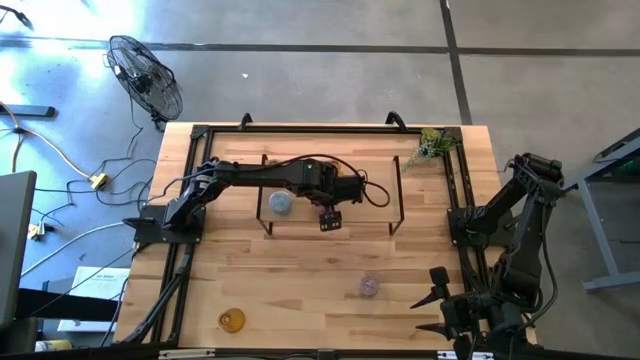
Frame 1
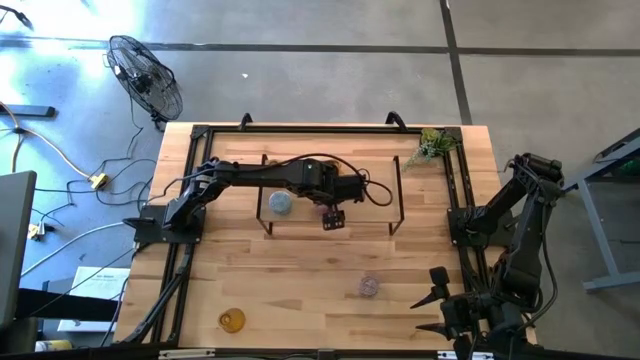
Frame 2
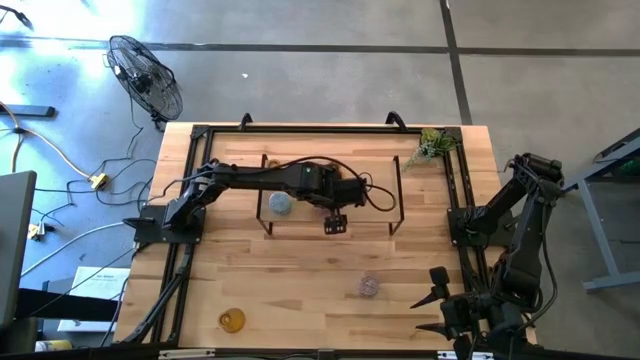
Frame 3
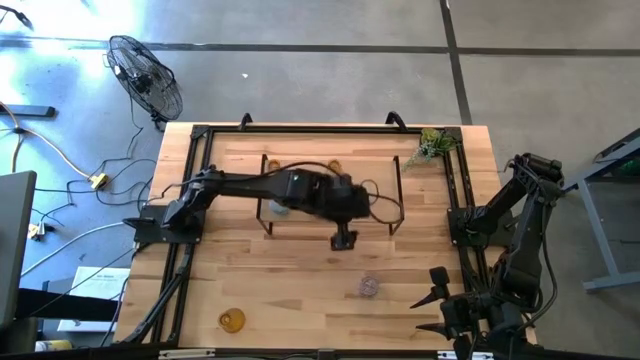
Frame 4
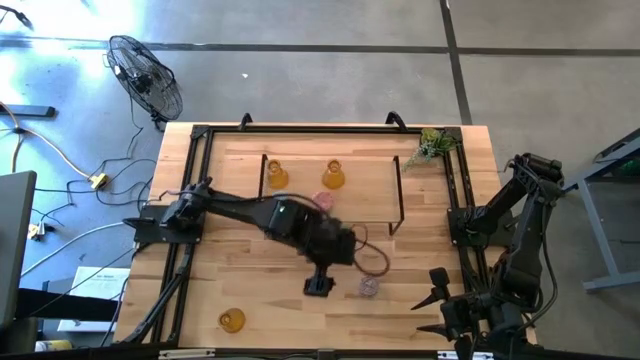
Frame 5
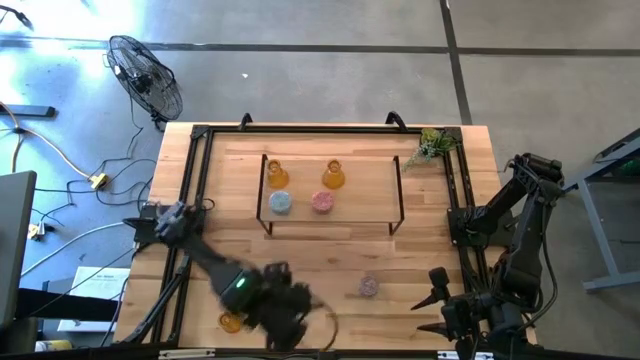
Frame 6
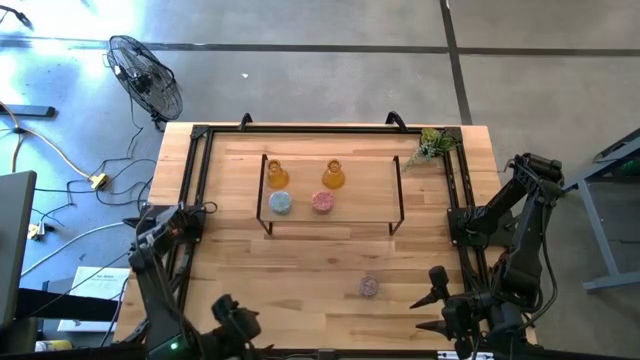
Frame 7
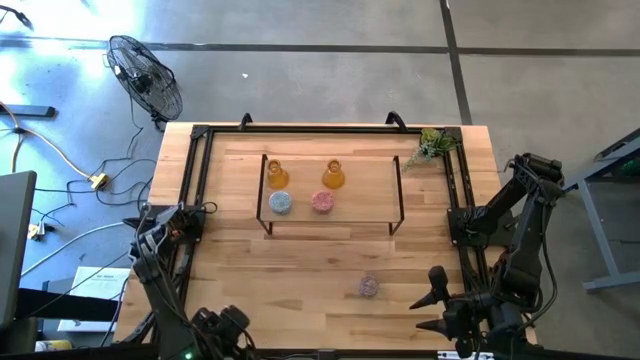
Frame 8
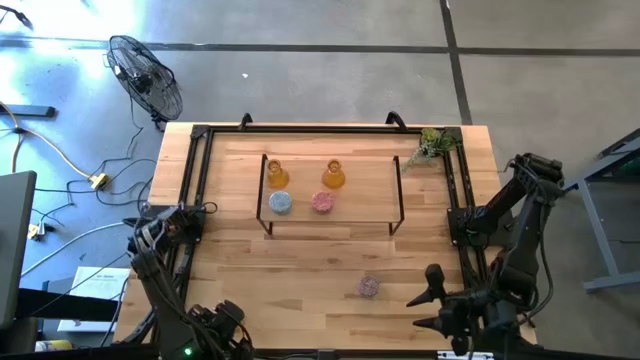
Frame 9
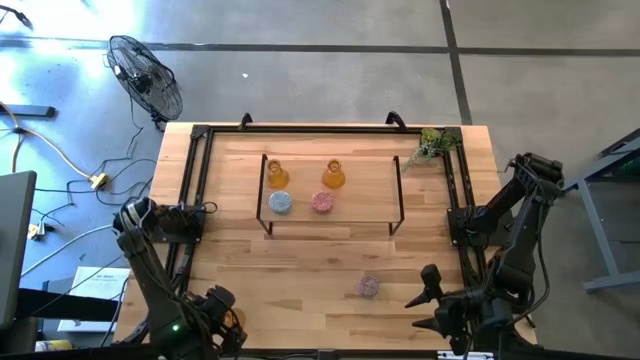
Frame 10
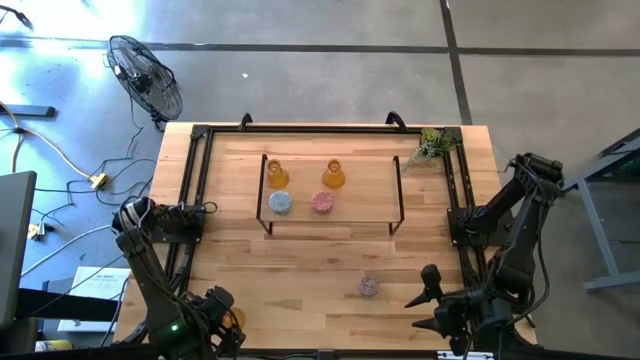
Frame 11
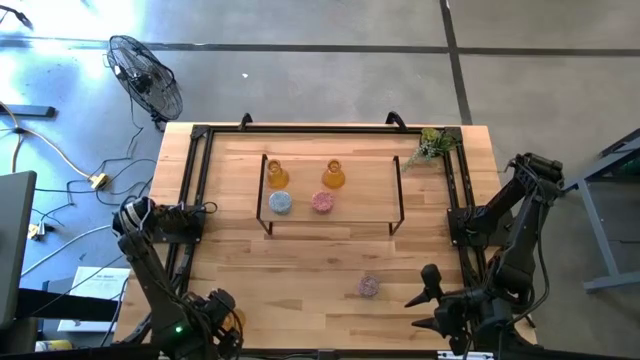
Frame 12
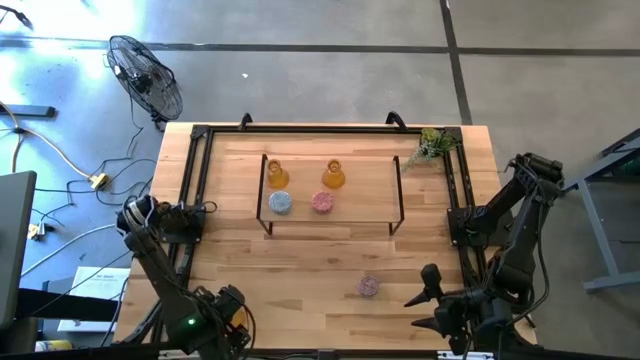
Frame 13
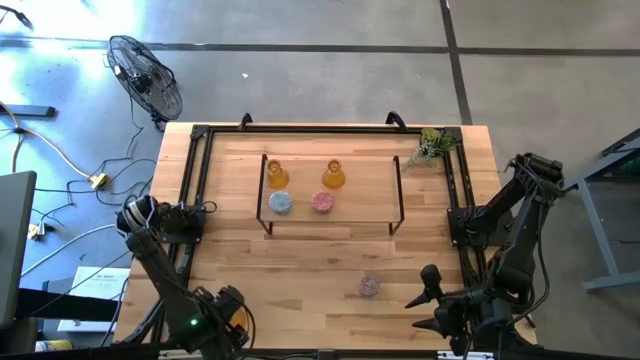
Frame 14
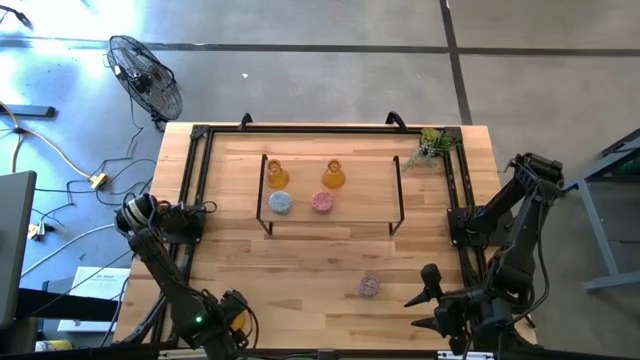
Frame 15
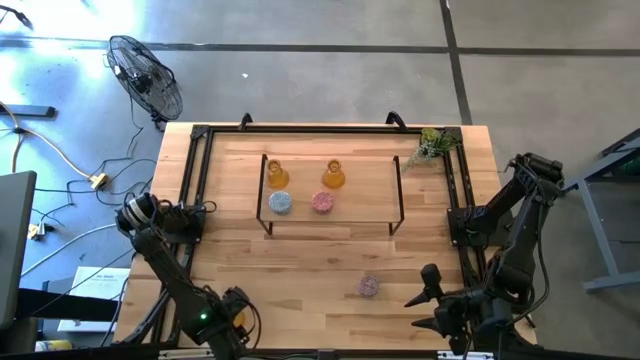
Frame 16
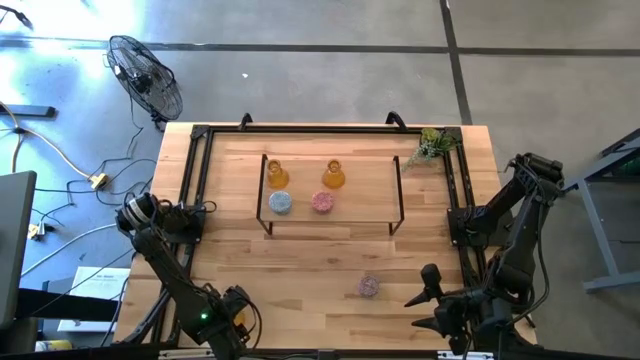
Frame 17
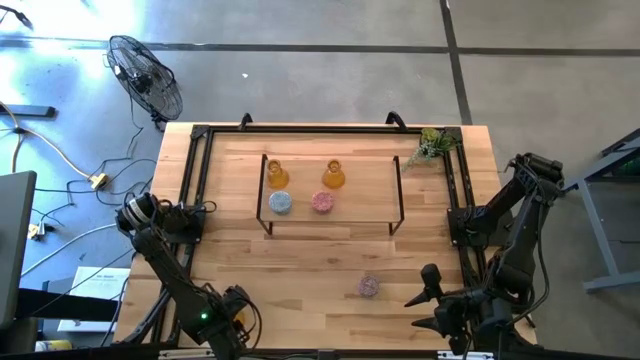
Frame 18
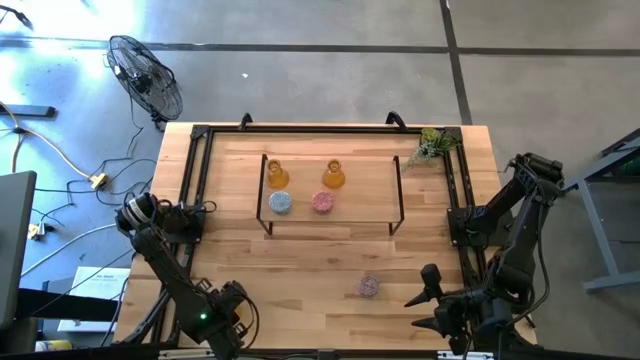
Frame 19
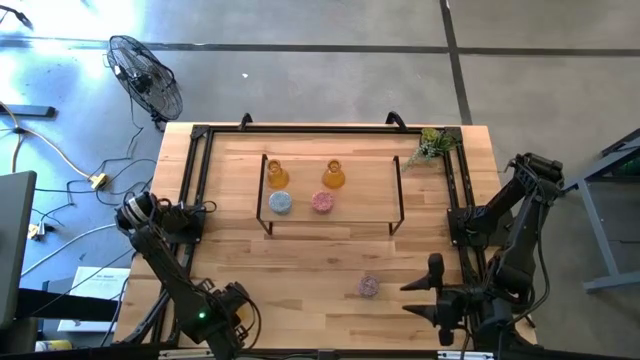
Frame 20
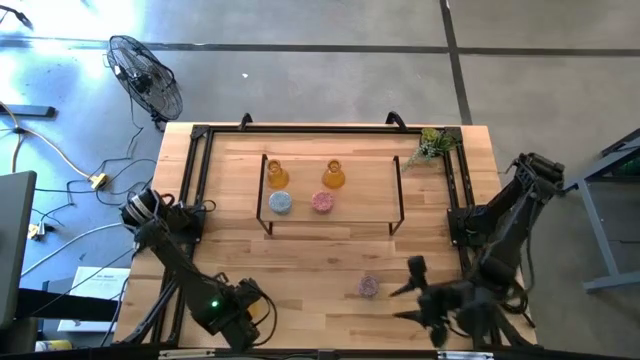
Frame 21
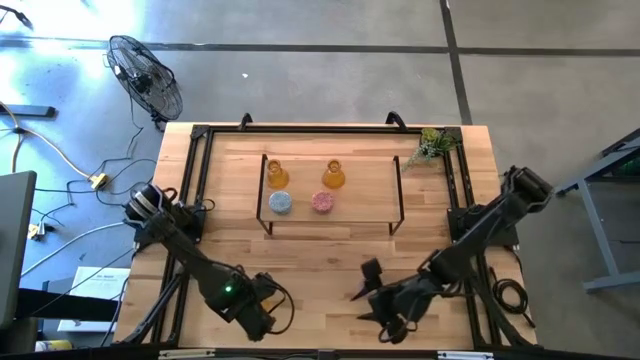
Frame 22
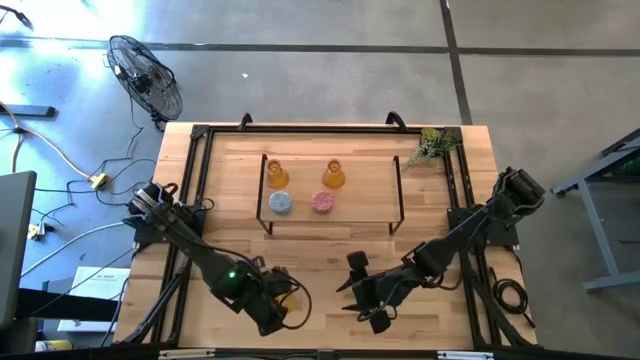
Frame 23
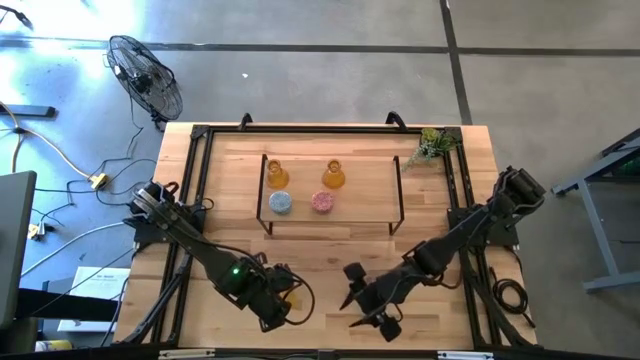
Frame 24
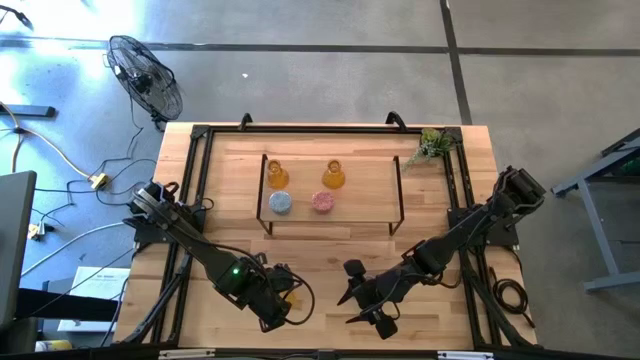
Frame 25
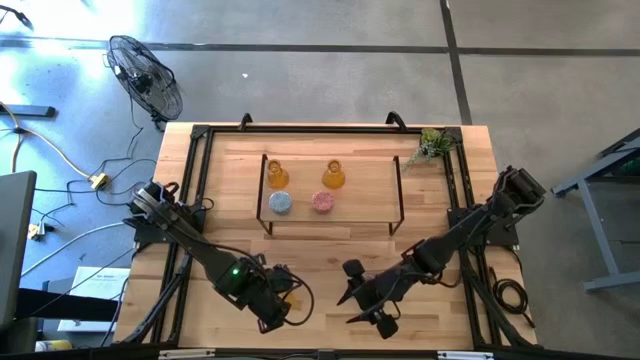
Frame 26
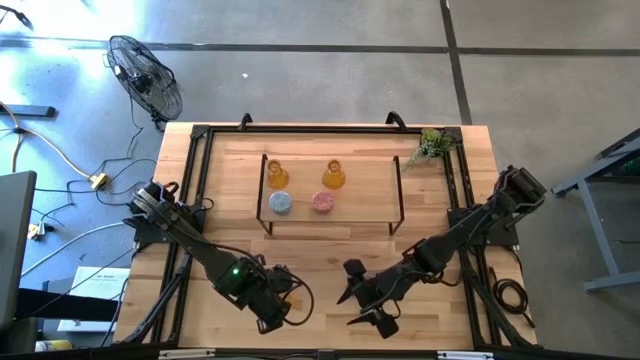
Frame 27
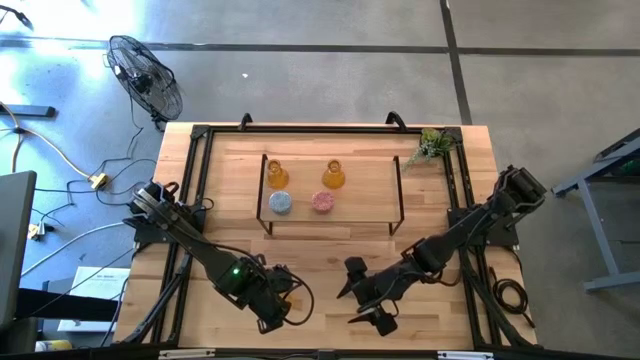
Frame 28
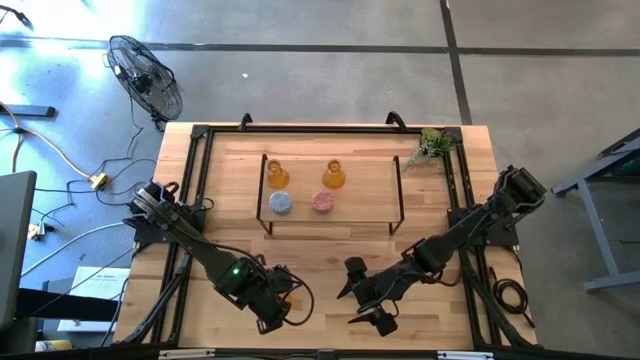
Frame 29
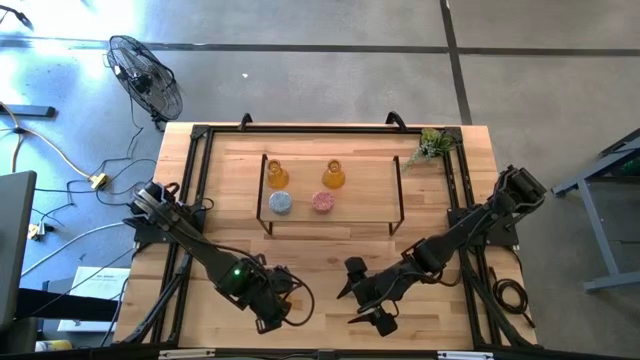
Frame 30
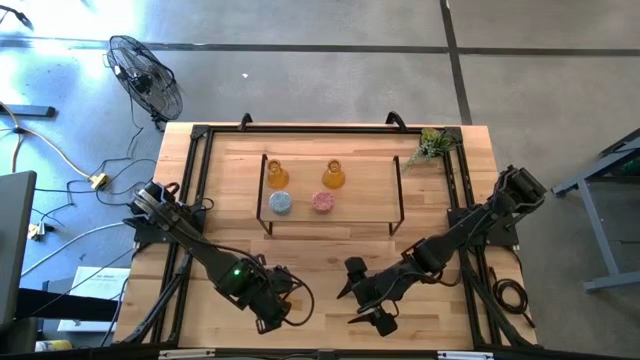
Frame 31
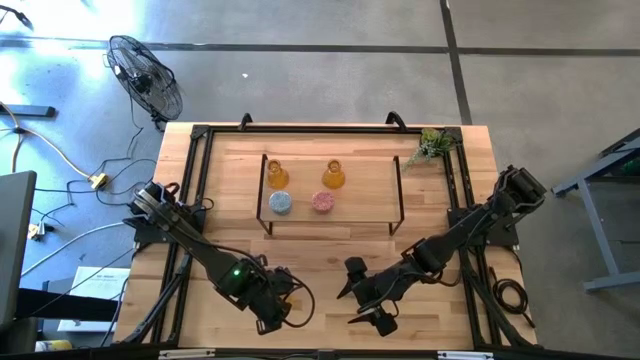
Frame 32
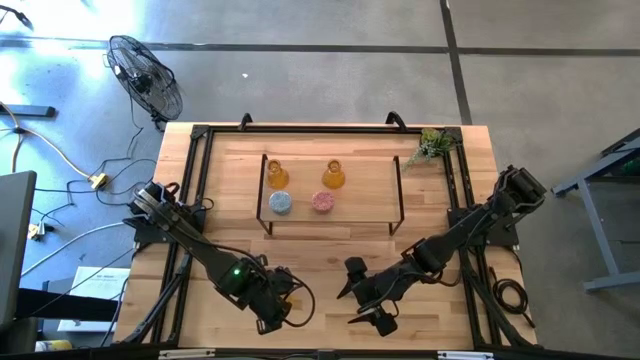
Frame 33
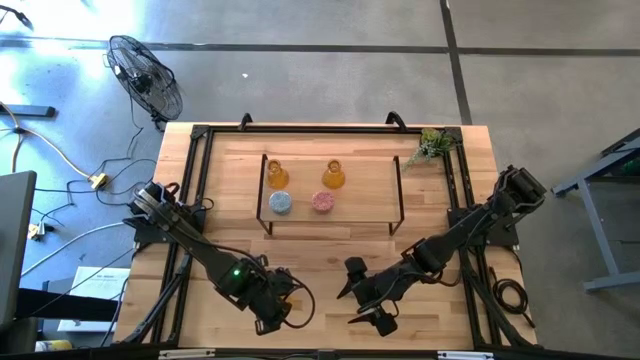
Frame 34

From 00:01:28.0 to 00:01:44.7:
Task: Pick & Place candle stick holders
Put the yellow glass candle holder on the shelf aligned with the other glass candle holder

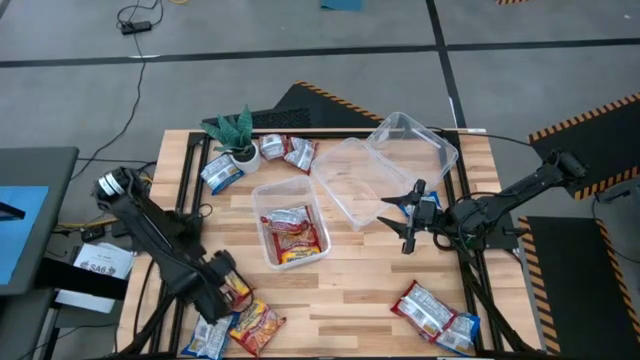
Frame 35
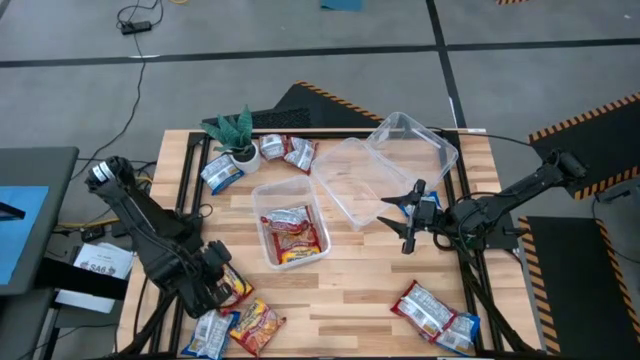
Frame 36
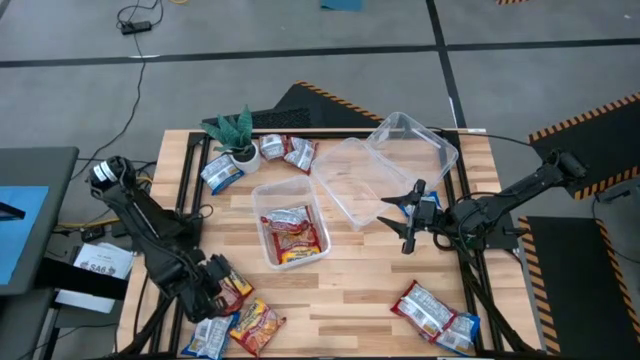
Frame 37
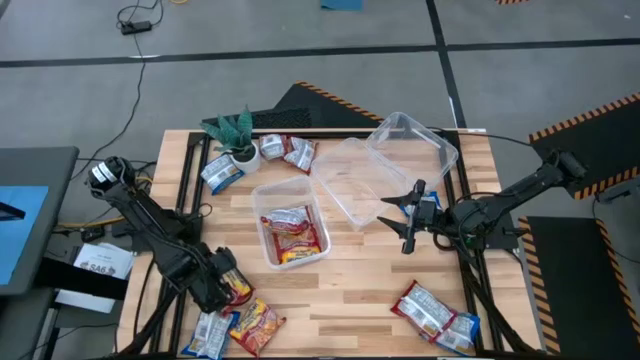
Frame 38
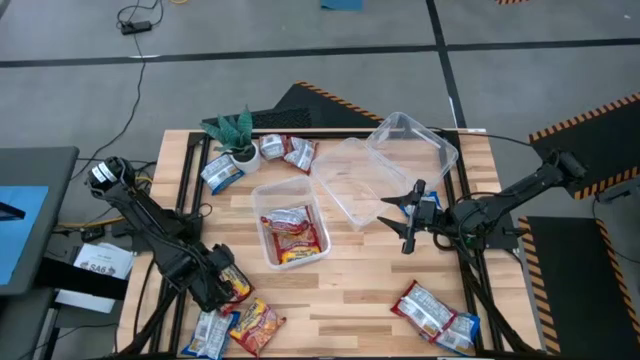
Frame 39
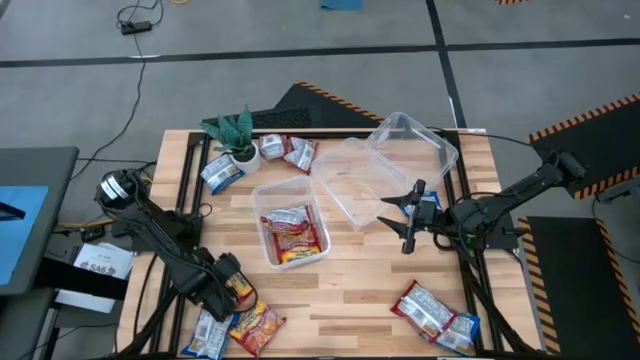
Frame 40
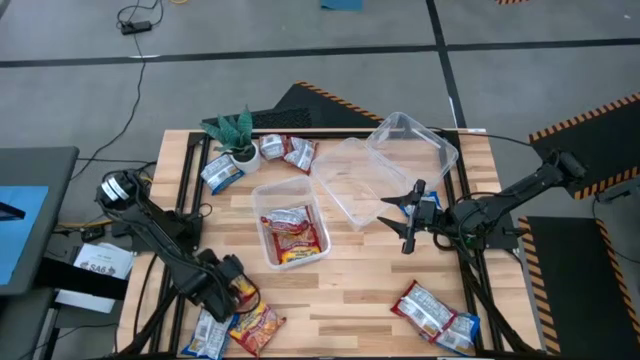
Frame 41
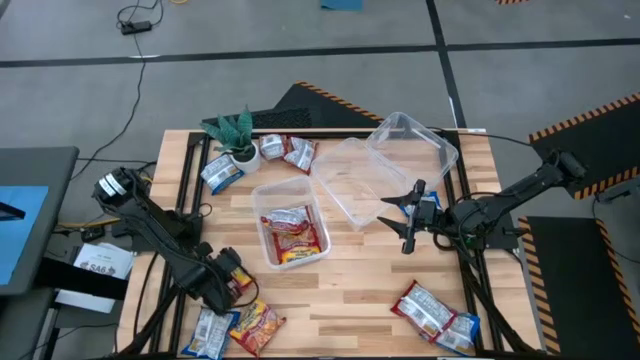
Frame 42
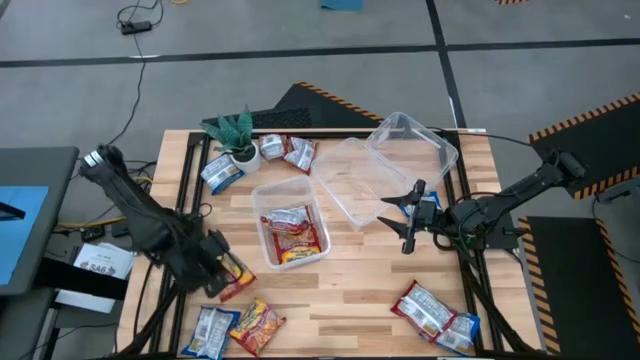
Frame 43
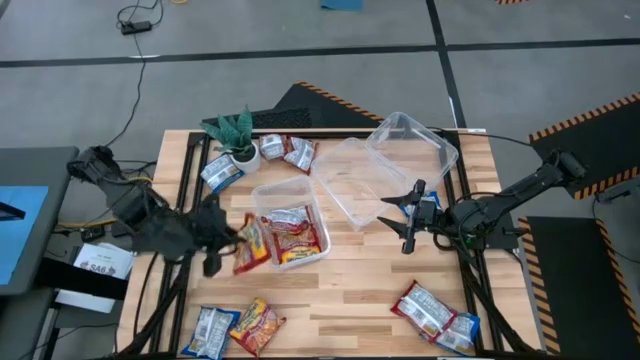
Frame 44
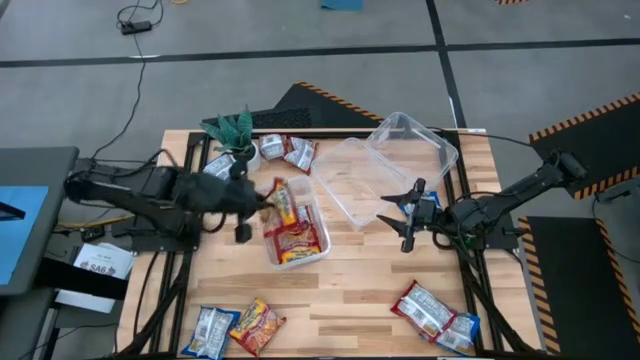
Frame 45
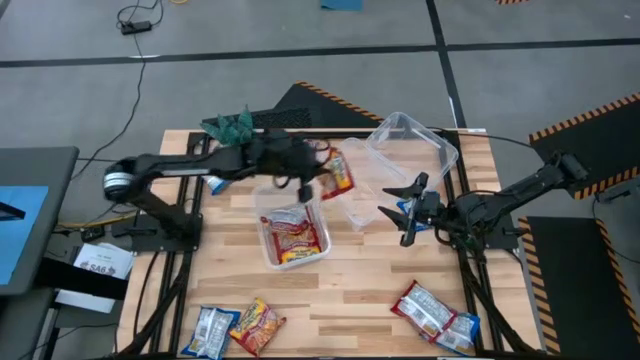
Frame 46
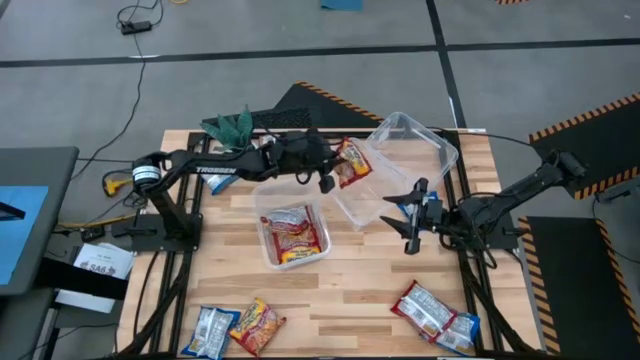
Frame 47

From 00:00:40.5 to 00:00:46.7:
Task: Sort Maruchan noodles
Put the red noodle pack into the middle bin
